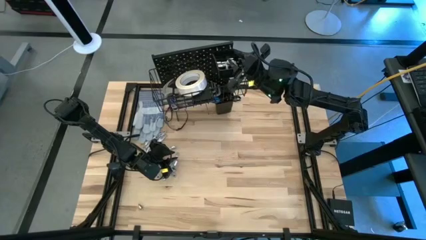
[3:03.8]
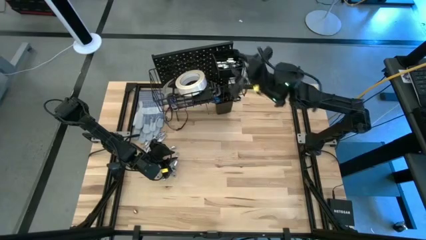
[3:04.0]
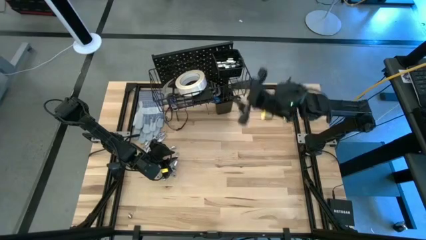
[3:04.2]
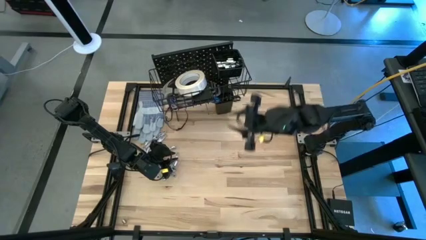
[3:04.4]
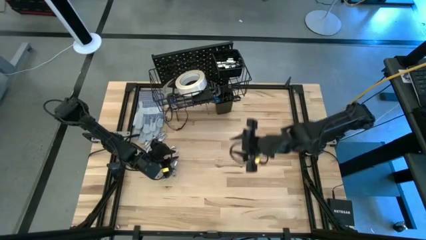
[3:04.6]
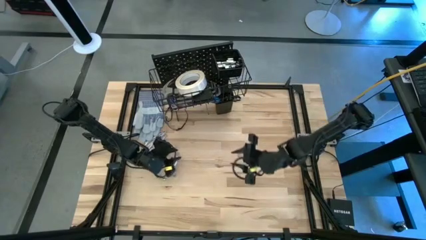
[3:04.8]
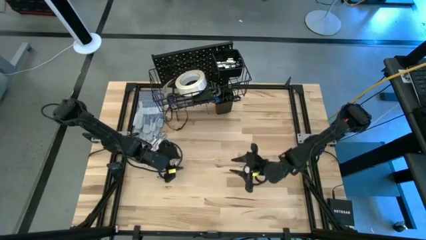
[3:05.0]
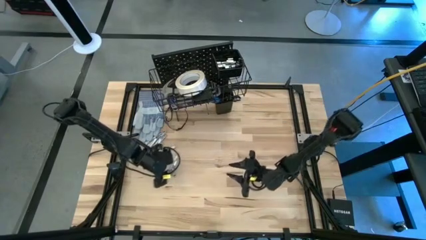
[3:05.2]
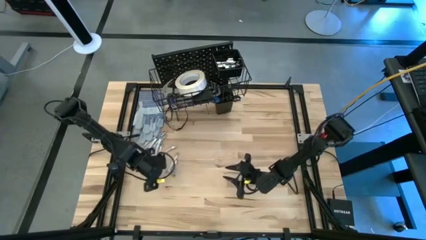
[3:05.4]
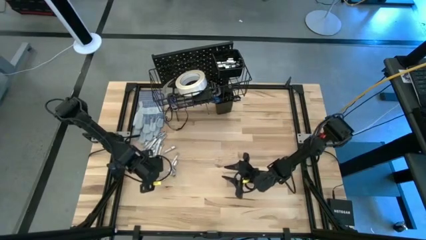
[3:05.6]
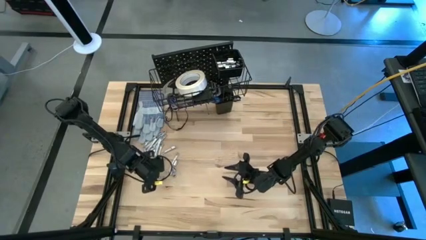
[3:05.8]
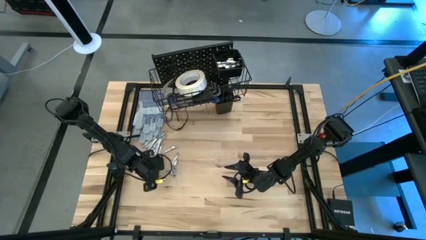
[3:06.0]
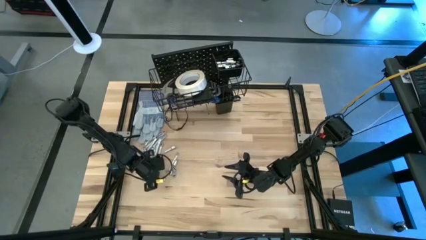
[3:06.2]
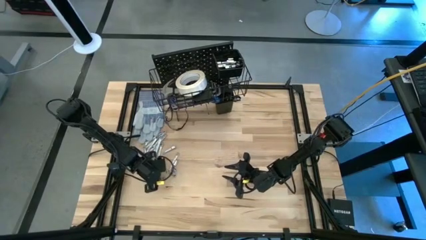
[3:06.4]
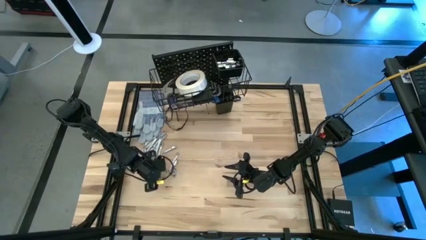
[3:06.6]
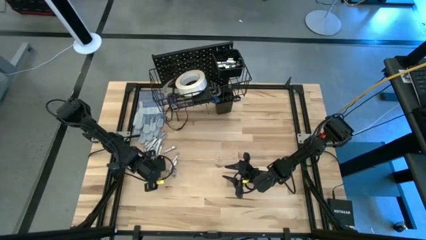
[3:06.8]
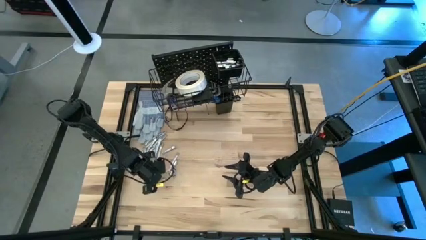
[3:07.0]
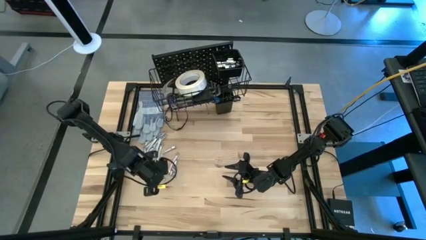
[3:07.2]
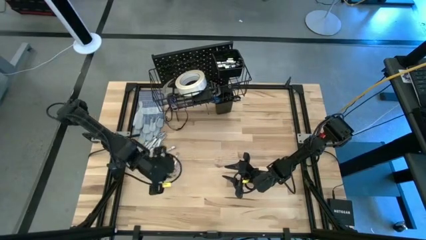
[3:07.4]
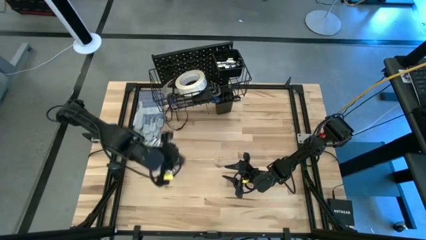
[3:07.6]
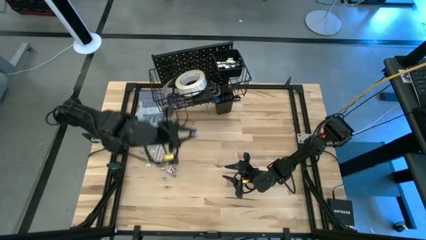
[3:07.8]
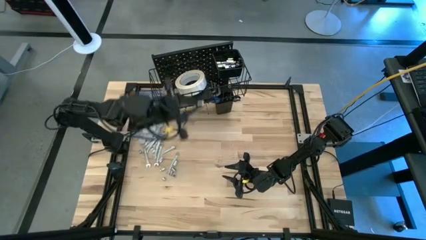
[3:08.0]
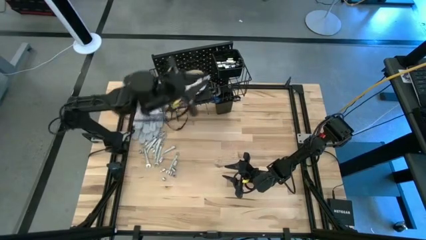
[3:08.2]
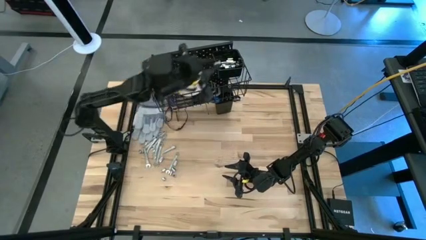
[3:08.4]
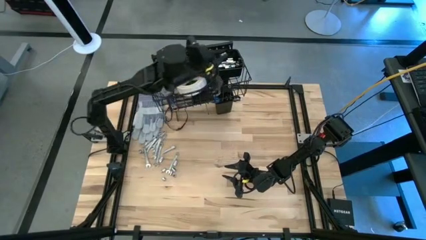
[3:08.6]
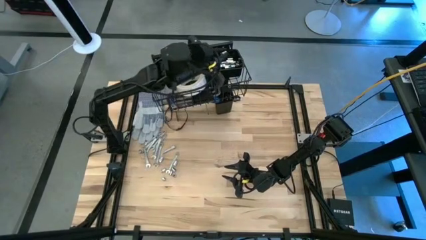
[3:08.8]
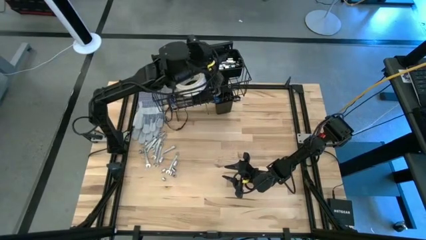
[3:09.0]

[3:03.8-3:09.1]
Task: Hang tools onto peg board
Put the socket into the top black bin on the pegboard

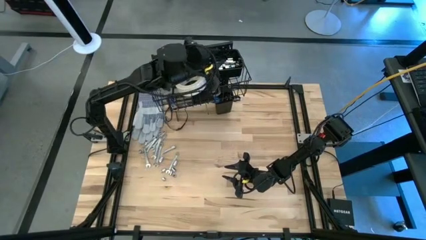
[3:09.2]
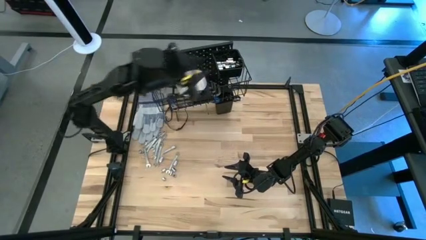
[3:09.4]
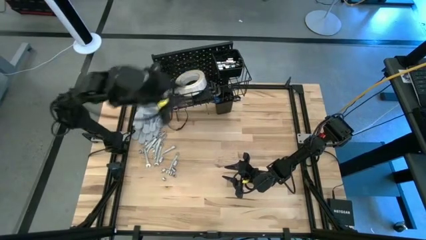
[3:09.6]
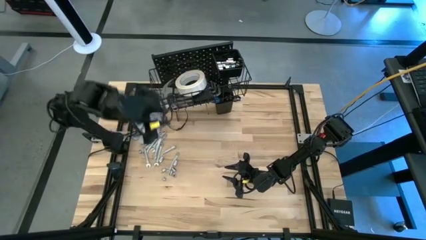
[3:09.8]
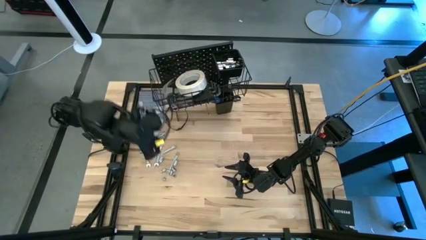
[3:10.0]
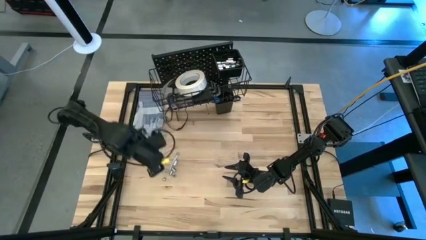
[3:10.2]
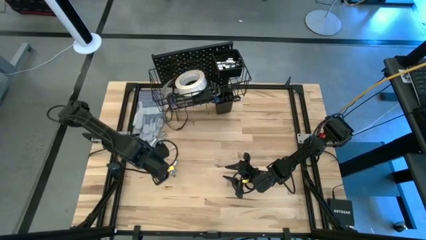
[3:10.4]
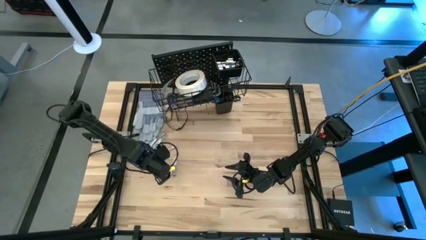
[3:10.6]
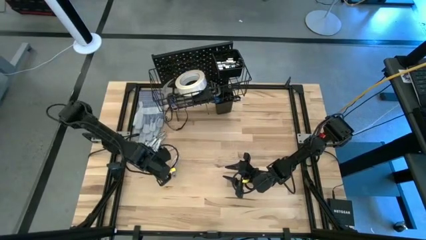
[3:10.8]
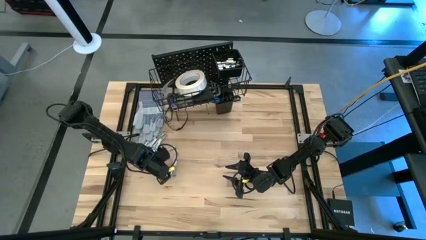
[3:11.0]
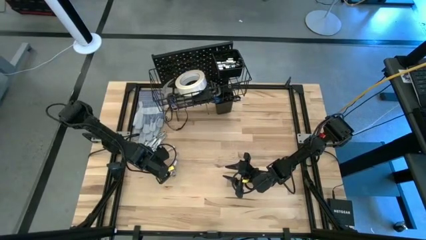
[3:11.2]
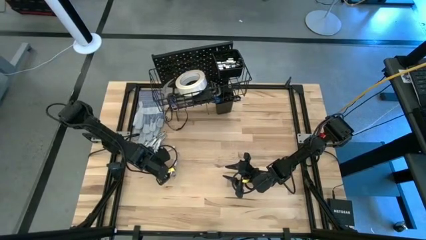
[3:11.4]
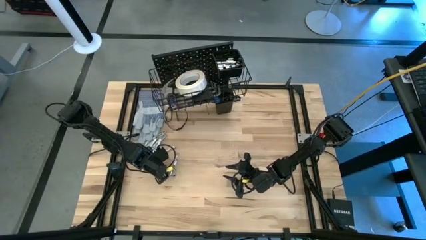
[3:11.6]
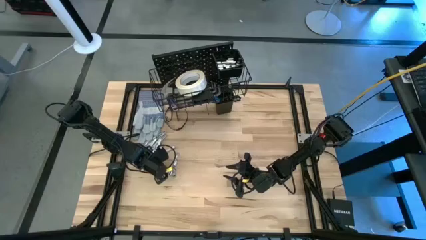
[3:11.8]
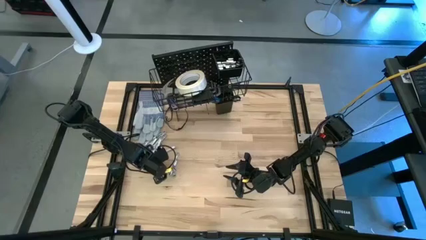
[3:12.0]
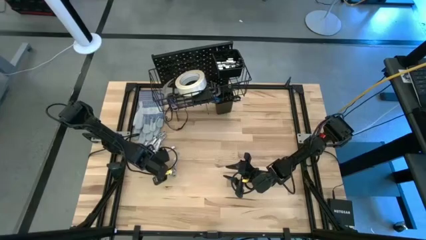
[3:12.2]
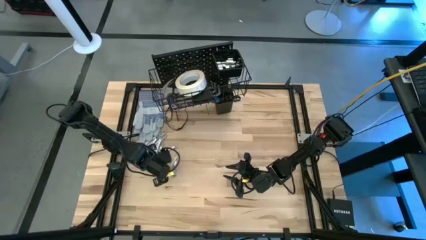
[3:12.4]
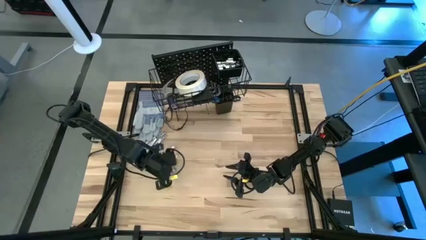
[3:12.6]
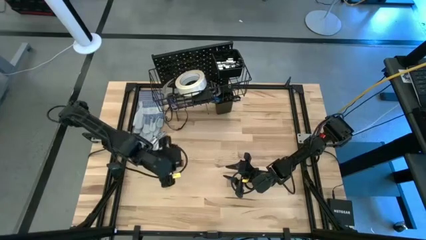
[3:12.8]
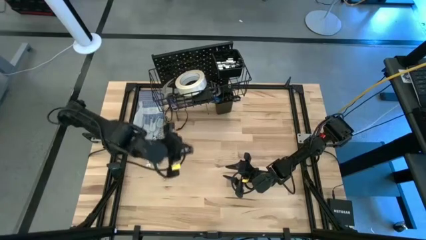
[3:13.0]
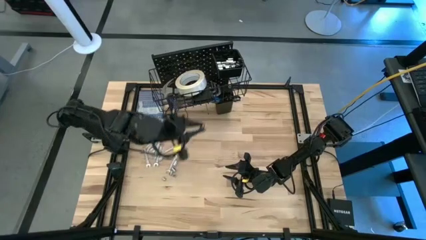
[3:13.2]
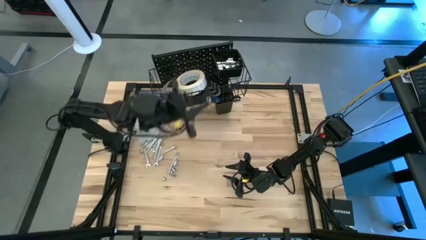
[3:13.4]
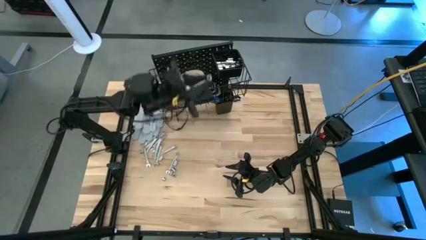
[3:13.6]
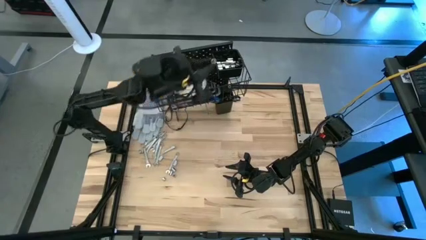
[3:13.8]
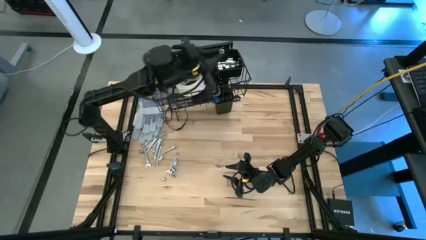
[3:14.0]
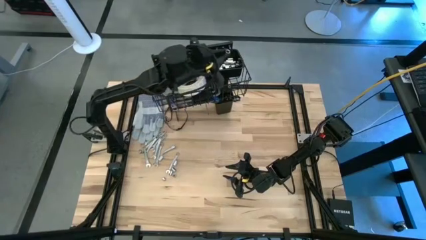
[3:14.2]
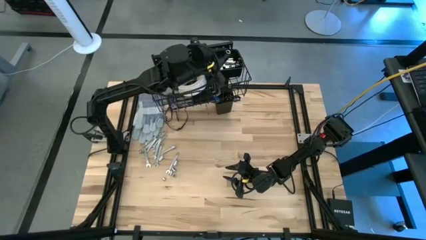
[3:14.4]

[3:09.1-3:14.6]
Put the socket into the top black bin on the pegboard

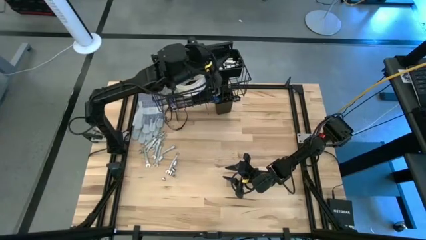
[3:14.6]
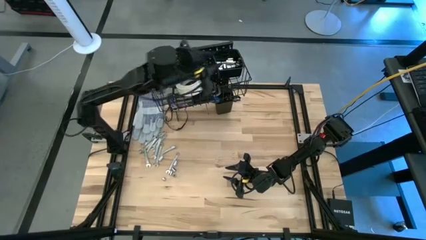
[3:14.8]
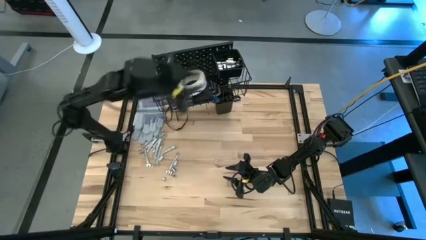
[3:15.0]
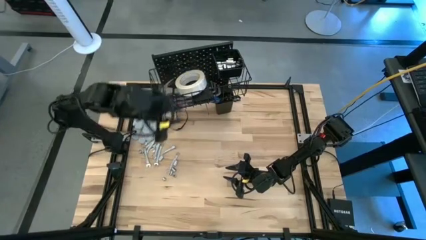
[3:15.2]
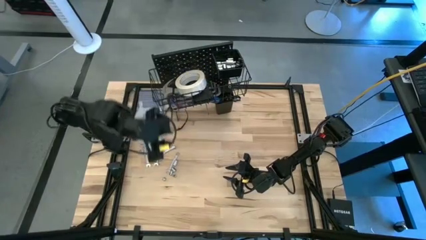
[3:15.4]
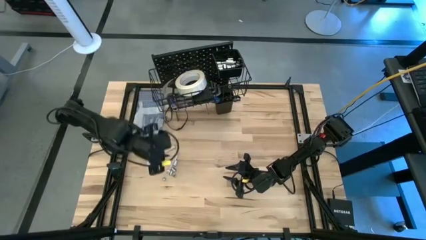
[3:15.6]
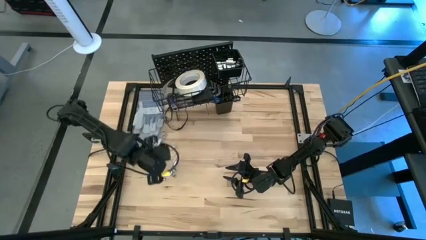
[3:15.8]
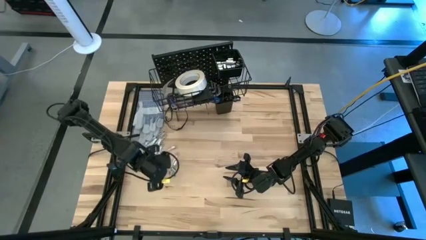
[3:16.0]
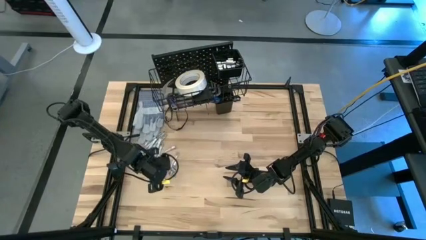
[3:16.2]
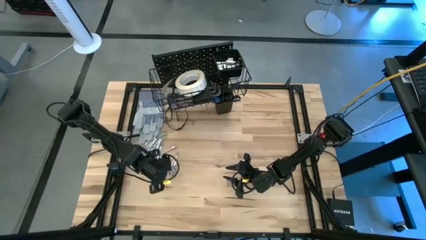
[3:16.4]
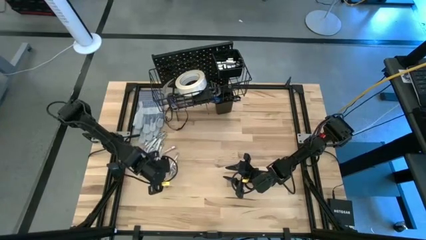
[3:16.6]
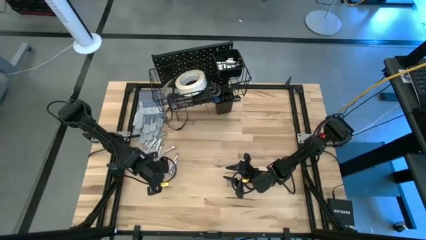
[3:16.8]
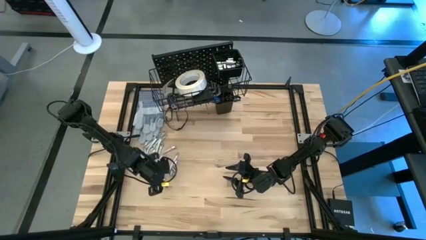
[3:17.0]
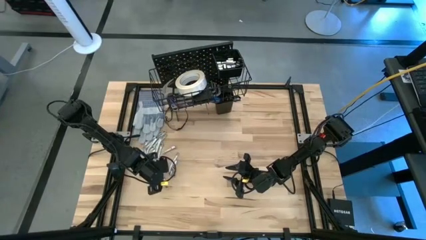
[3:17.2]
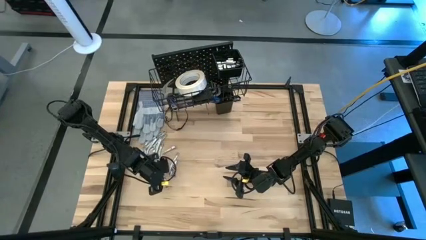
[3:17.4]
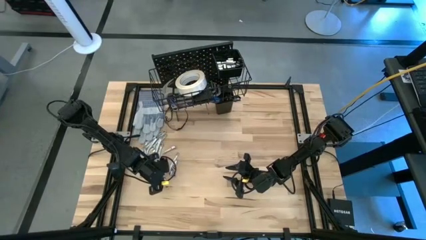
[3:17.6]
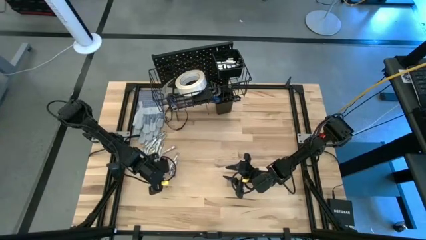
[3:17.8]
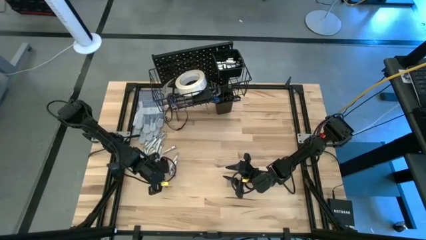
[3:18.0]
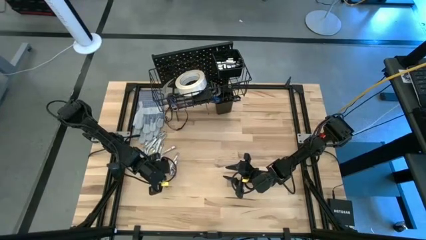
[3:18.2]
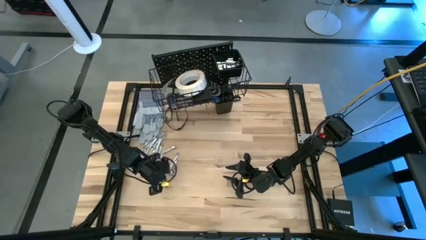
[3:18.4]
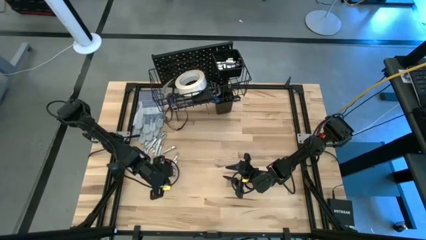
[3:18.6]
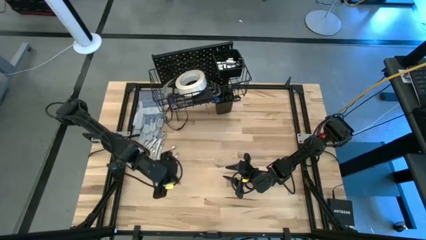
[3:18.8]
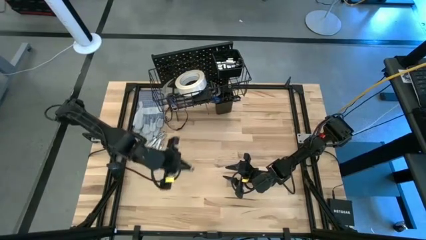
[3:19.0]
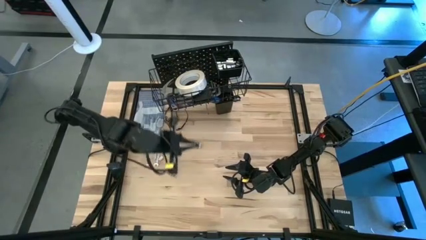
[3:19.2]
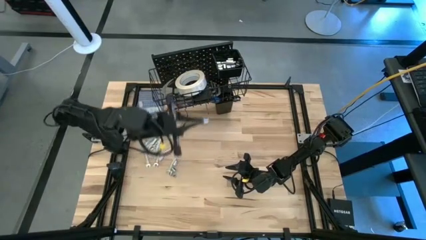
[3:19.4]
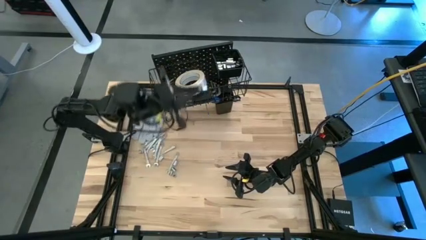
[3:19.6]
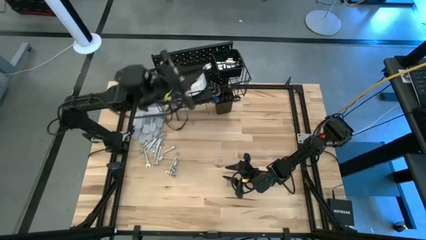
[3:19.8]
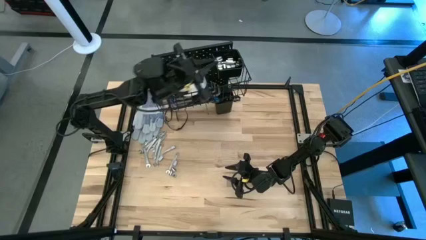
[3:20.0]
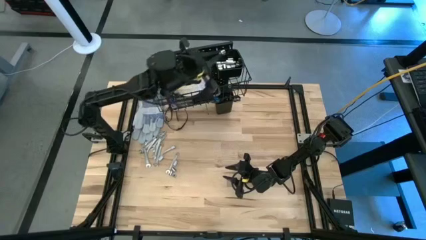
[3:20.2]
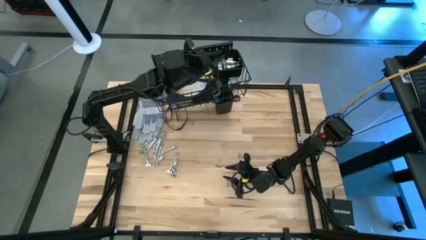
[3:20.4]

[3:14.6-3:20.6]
Put the socket into the top black bin on the pegboard
